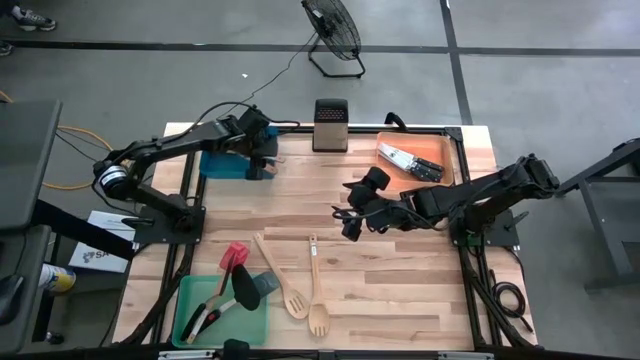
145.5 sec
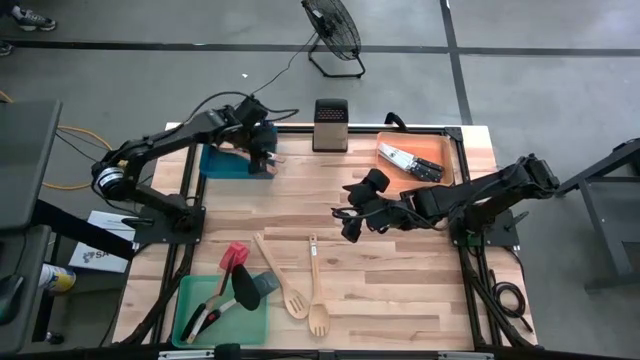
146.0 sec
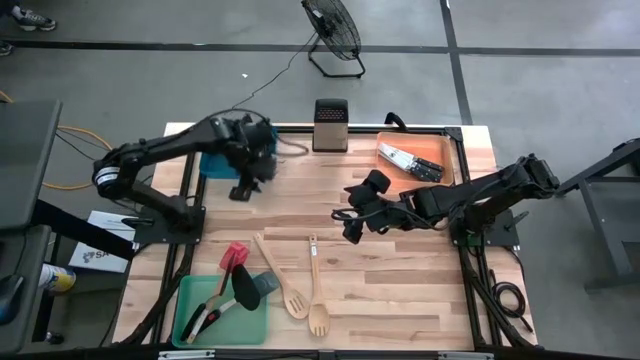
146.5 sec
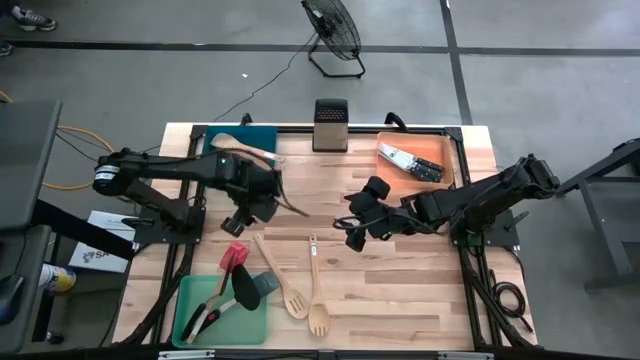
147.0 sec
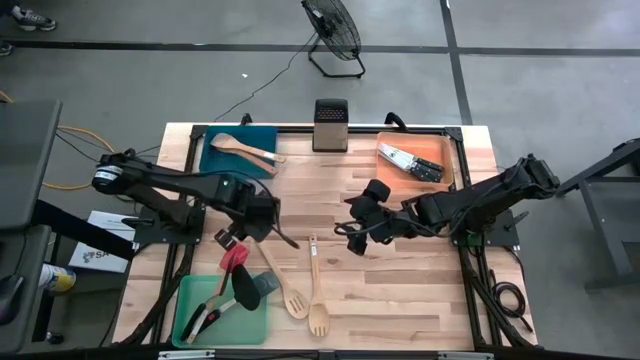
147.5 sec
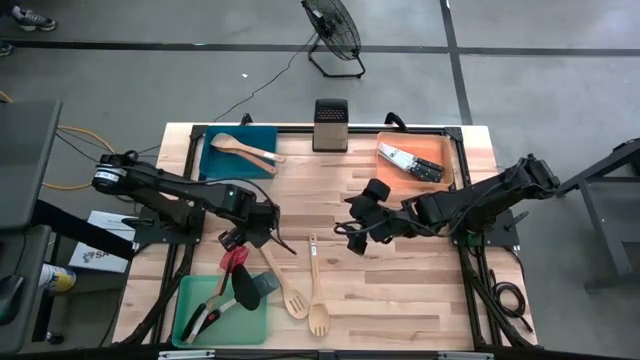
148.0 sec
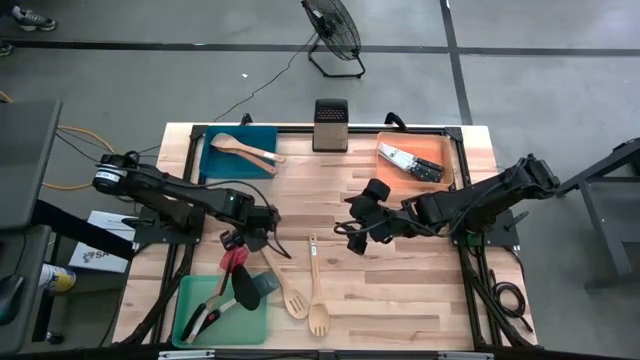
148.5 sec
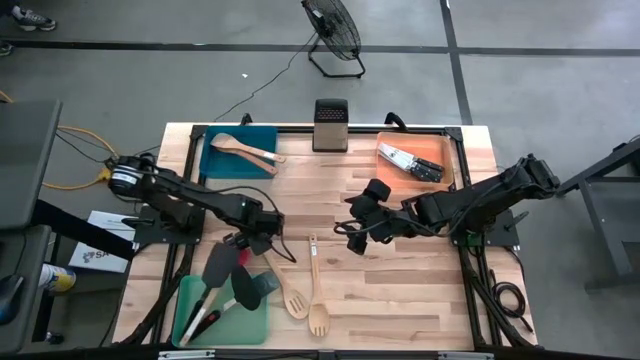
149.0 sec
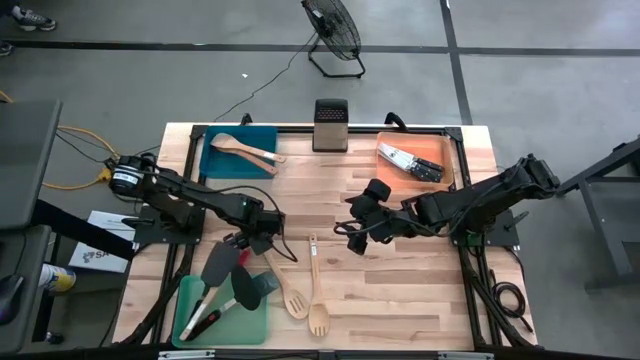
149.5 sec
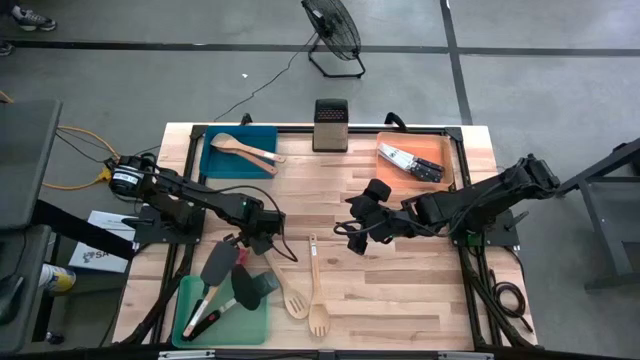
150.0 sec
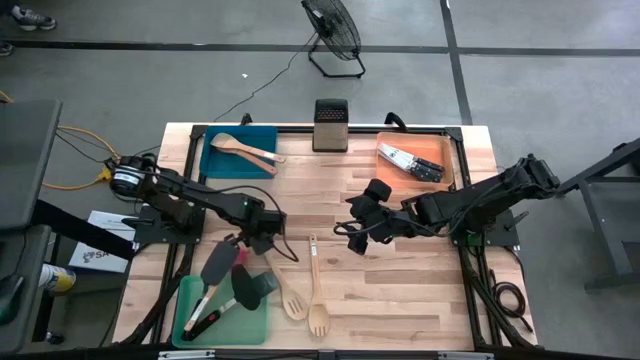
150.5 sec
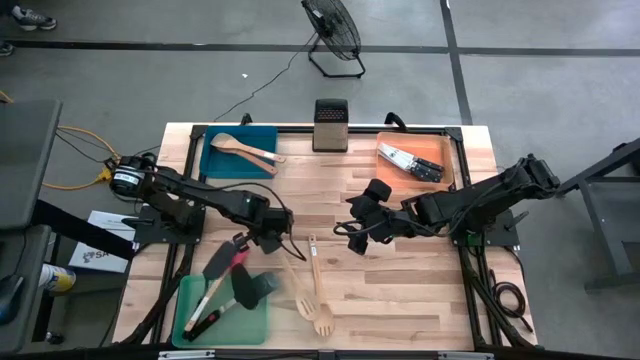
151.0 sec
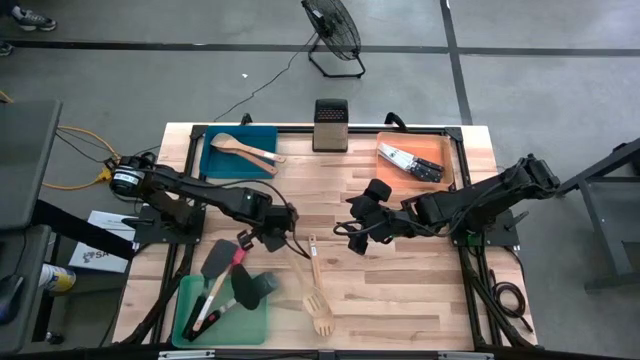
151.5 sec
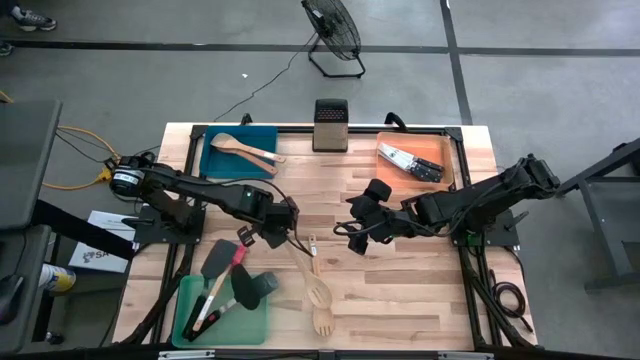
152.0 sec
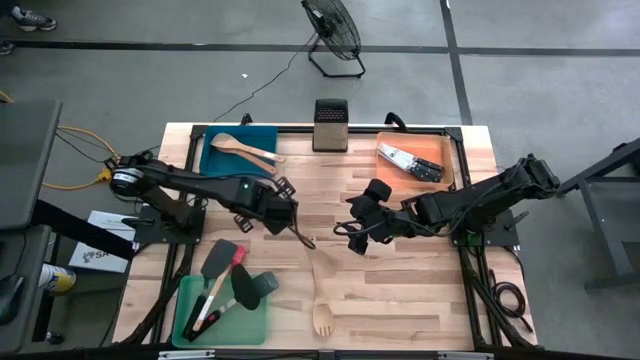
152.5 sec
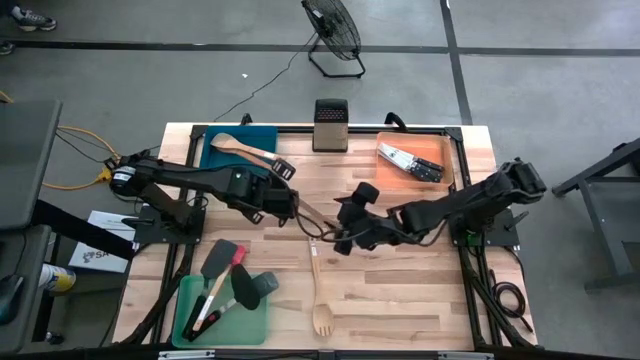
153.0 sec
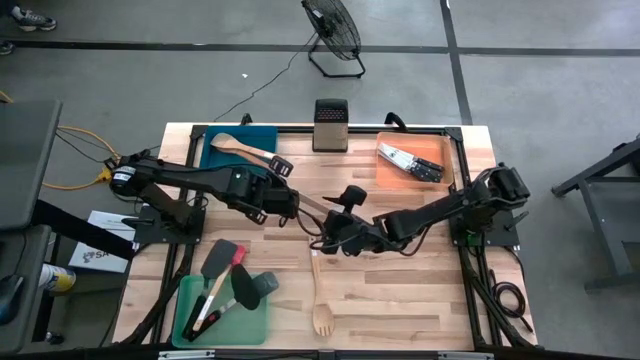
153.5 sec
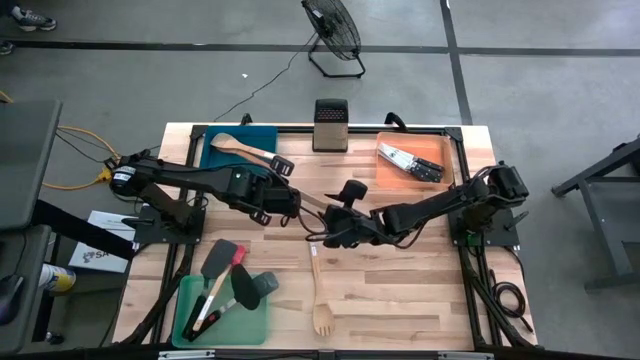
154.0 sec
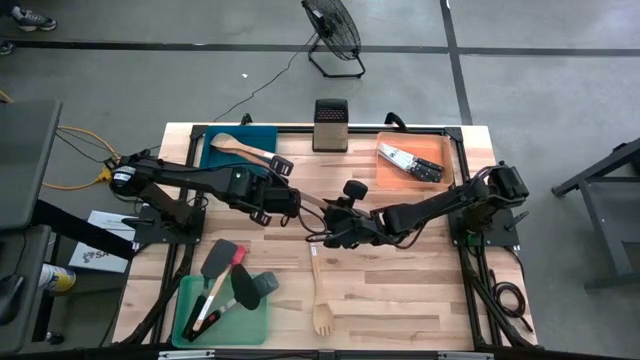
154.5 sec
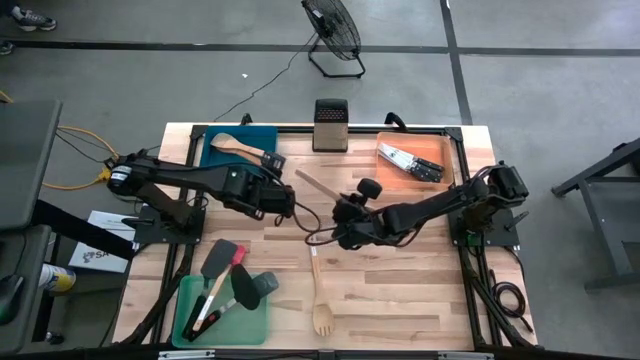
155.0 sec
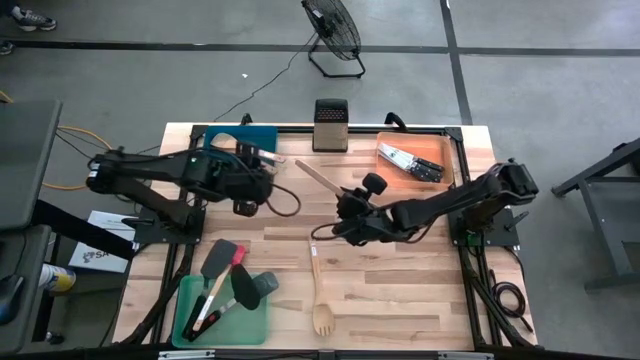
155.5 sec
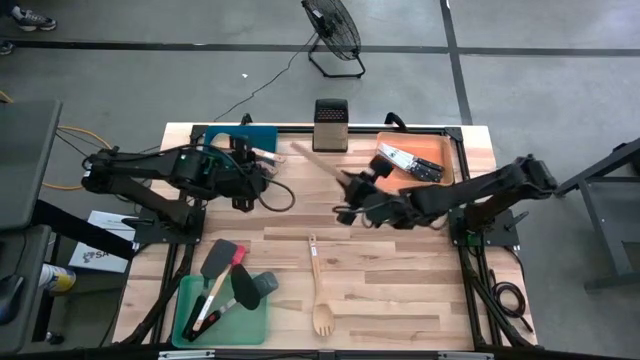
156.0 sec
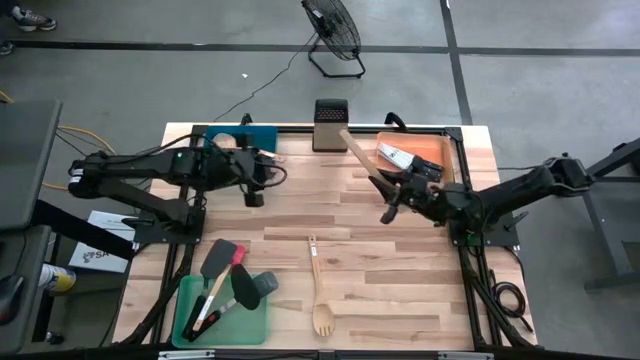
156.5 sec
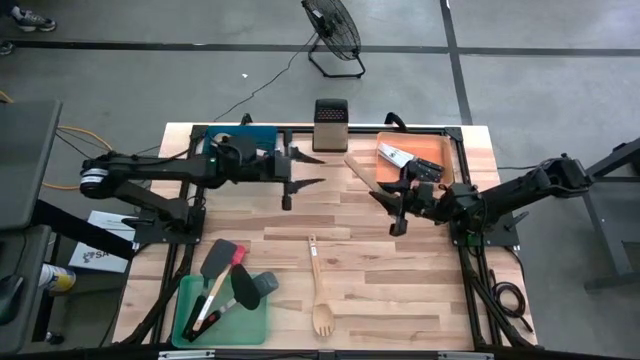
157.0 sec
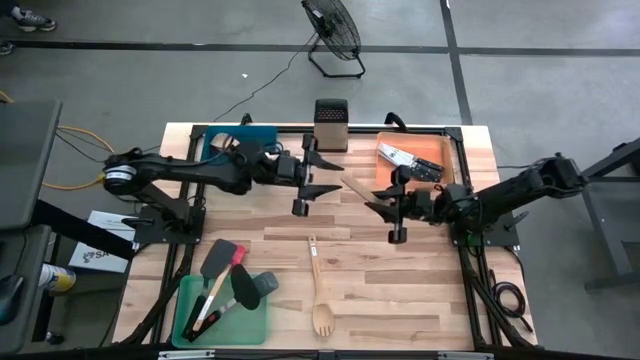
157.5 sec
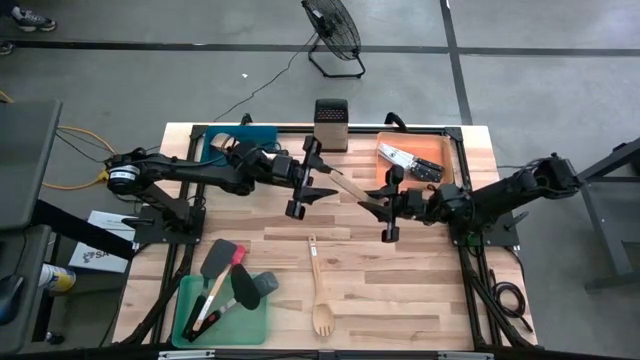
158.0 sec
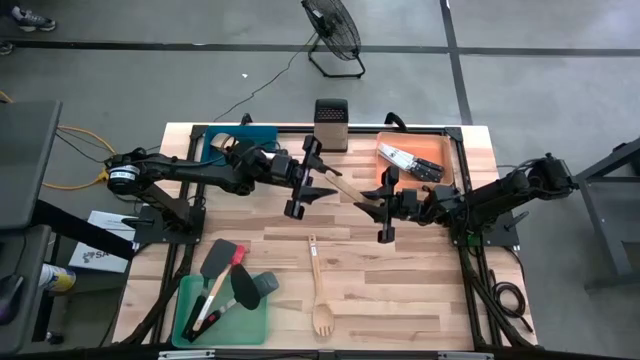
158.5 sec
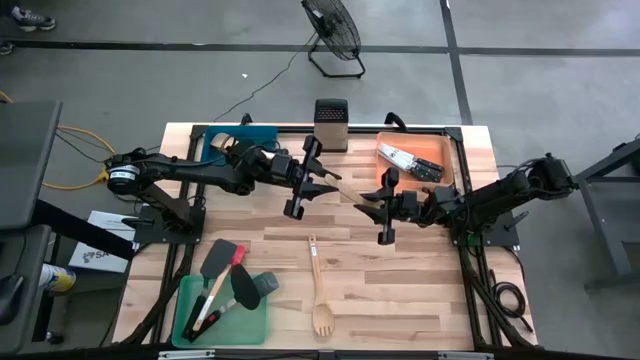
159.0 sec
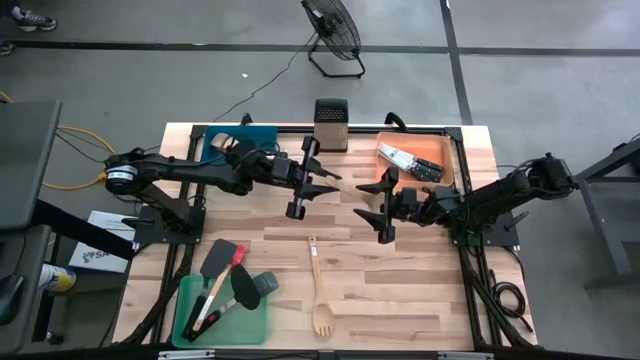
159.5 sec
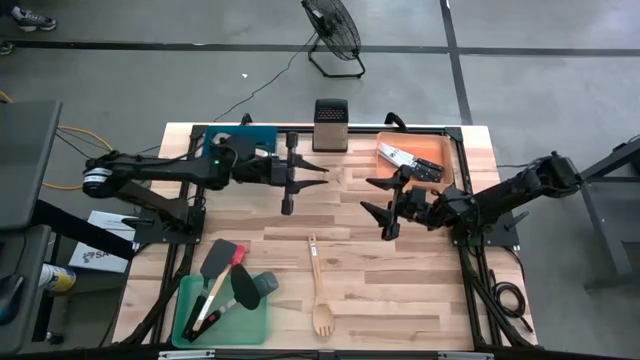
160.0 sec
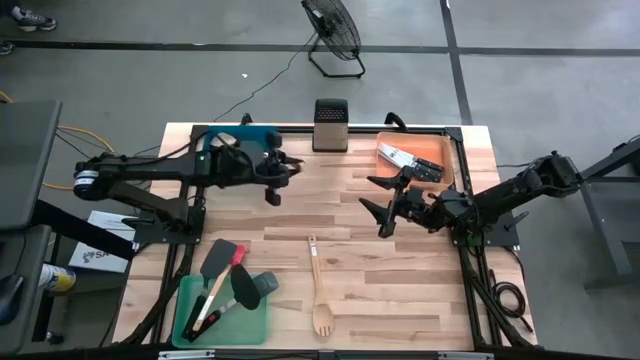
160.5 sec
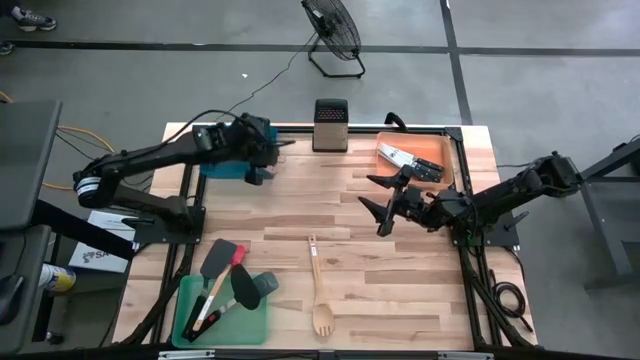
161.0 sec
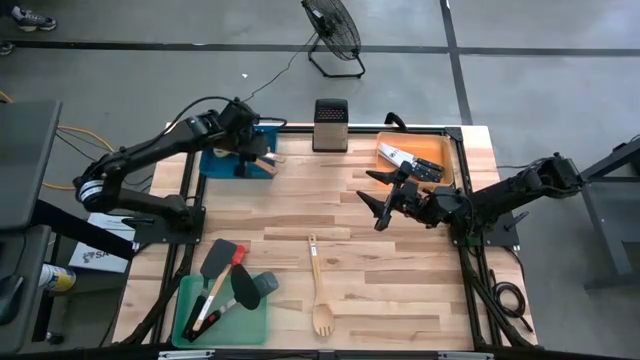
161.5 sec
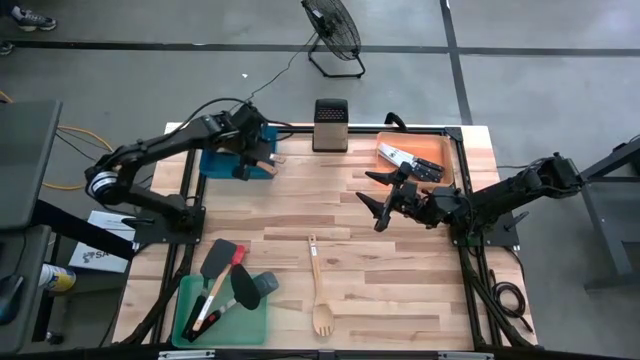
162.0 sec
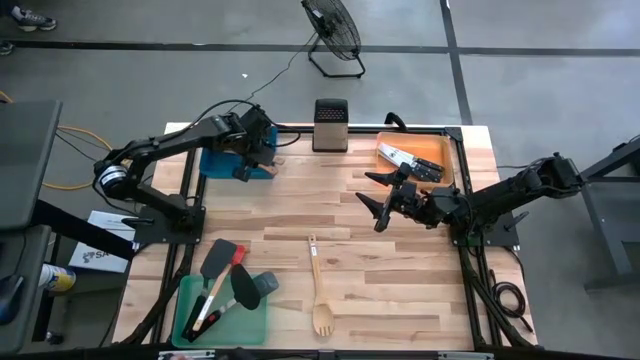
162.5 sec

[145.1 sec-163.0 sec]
Task: Pick & Place Kitchen Items
Put the brown wooden spoon into the blue bin

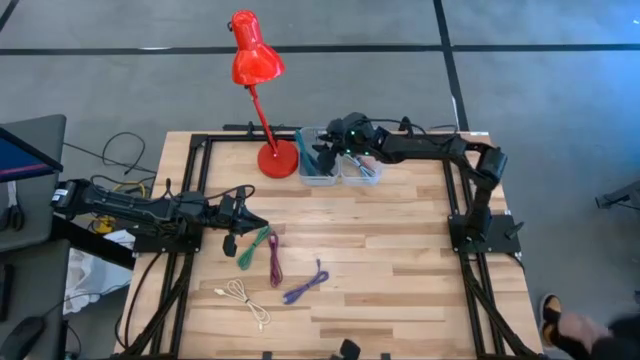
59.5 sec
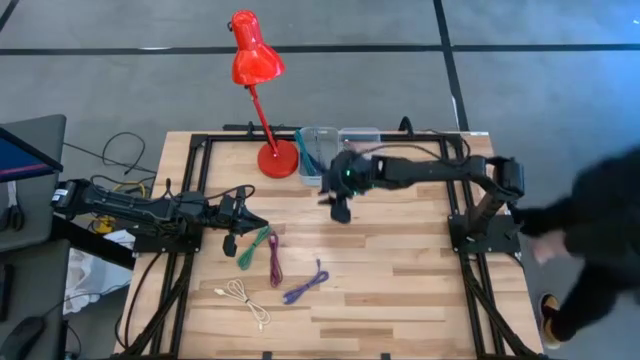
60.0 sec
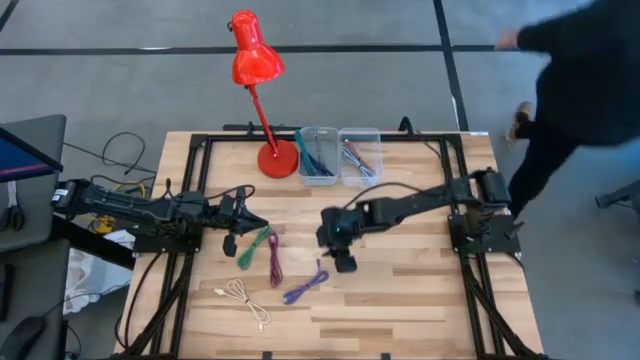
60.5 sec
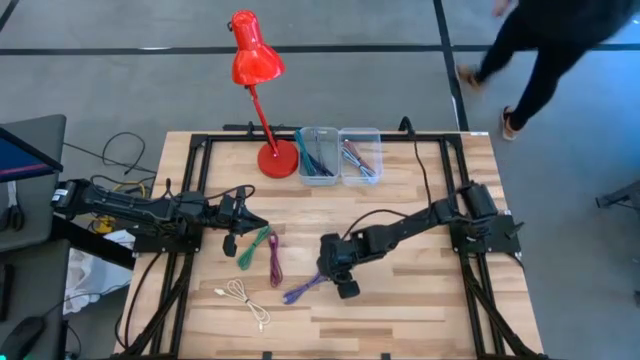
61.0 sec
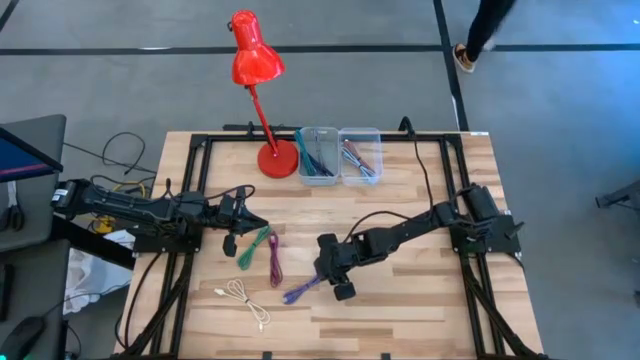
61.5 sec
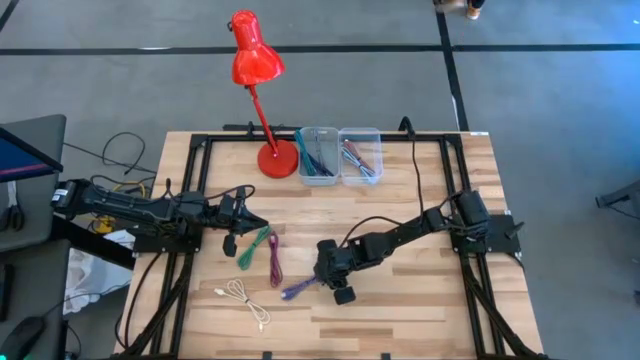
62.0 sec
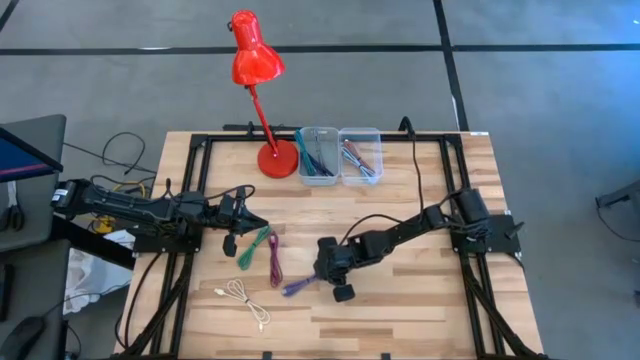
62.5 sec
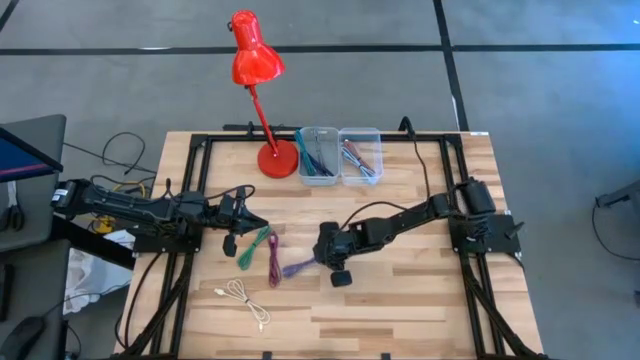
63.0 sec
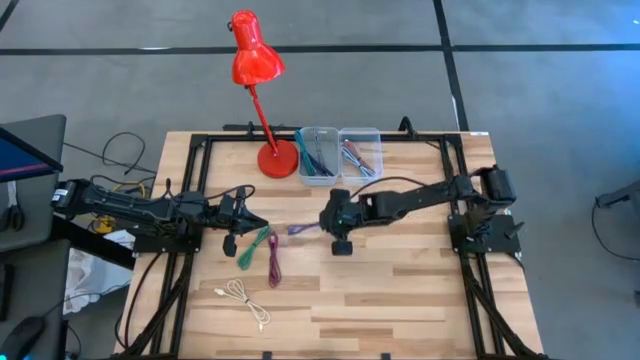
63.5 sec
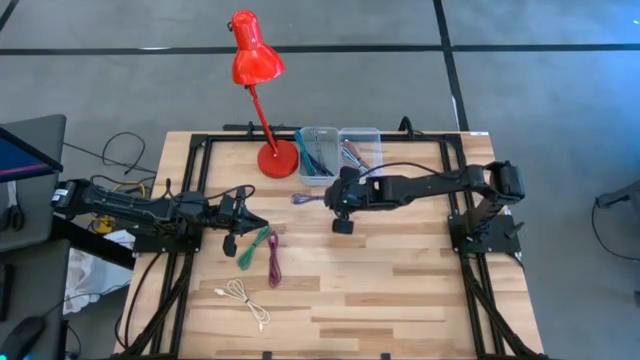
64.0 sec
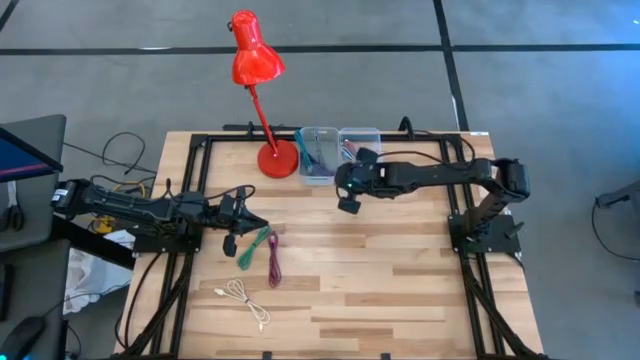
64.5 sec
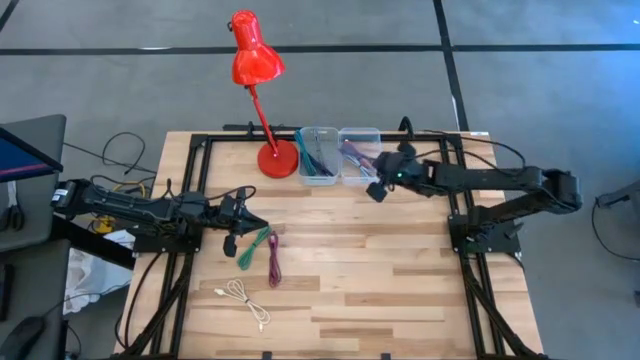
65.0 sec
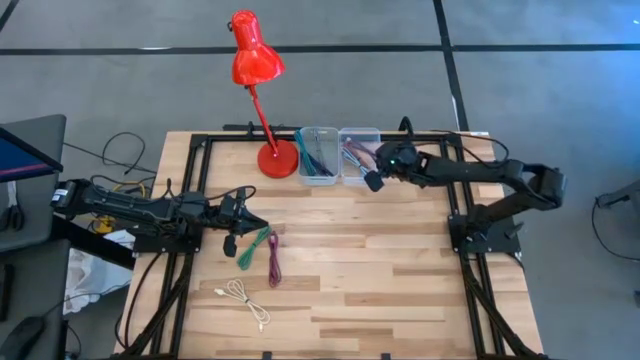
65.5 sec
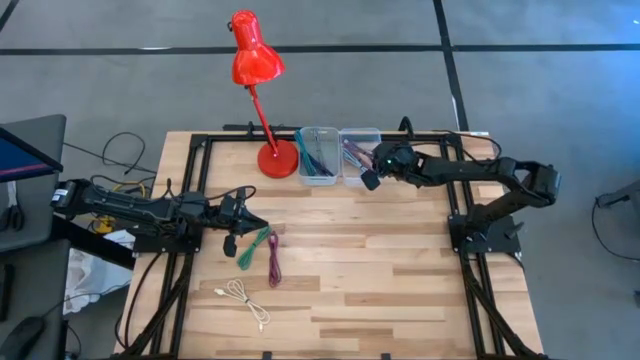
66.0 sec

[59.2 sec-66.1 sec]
Task: Pick & Place USB Port
Put the violet charger cable into the transparent bin
